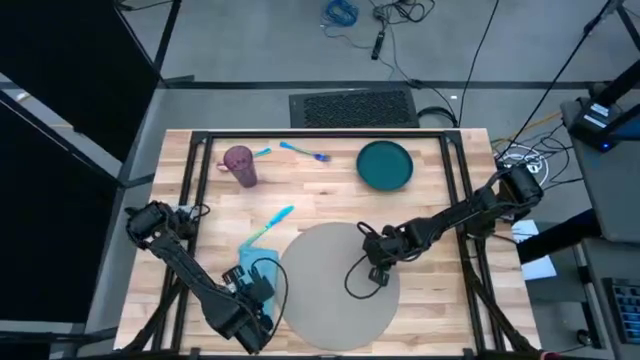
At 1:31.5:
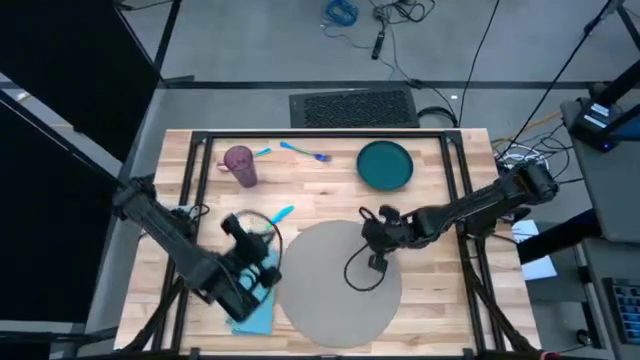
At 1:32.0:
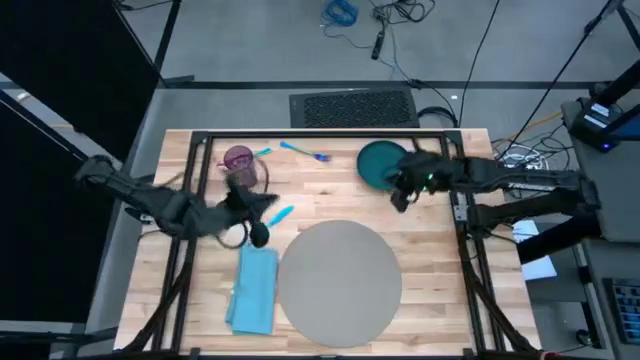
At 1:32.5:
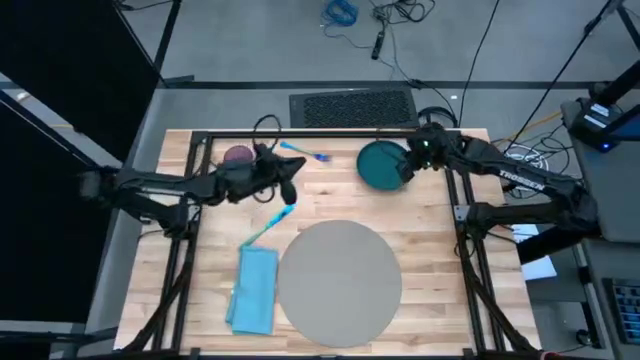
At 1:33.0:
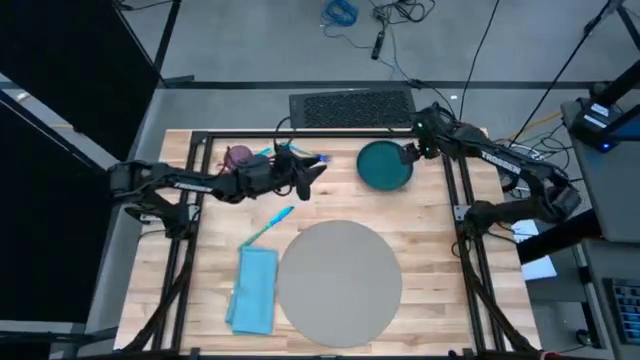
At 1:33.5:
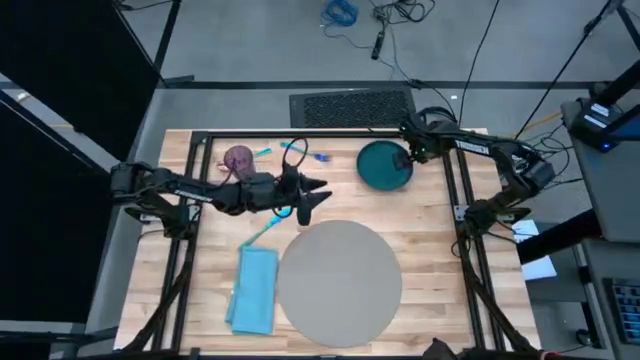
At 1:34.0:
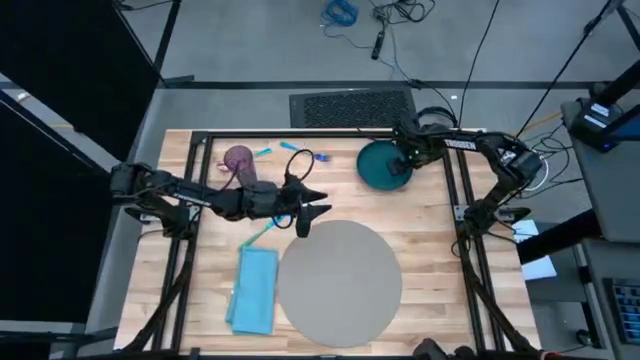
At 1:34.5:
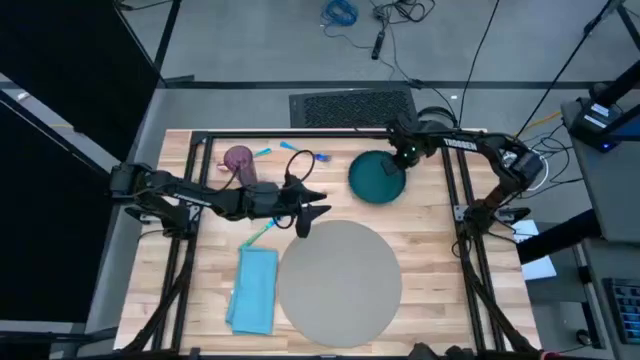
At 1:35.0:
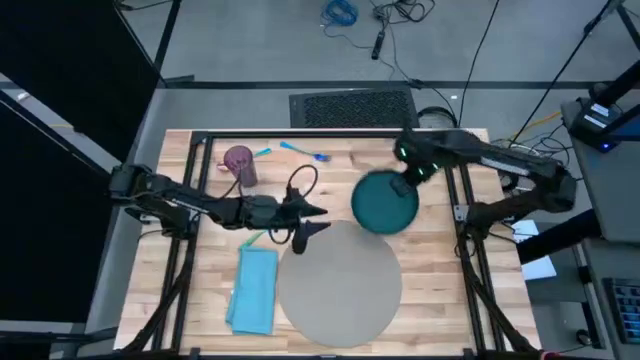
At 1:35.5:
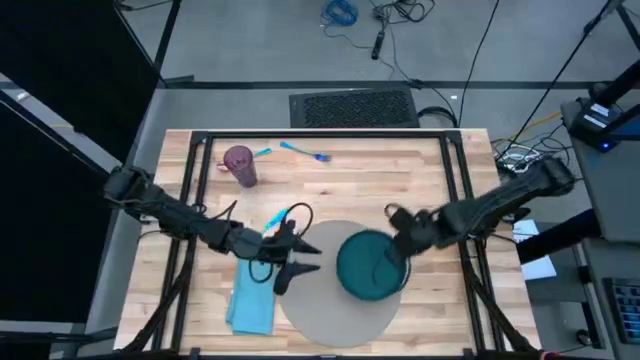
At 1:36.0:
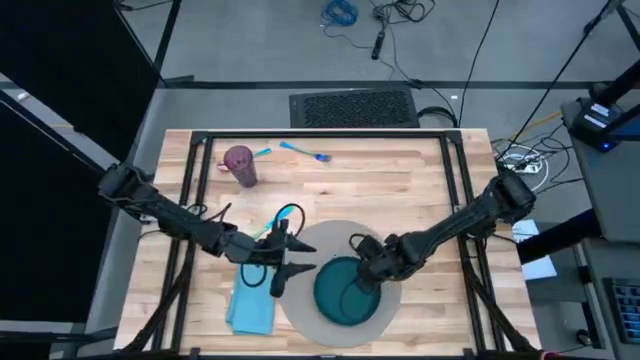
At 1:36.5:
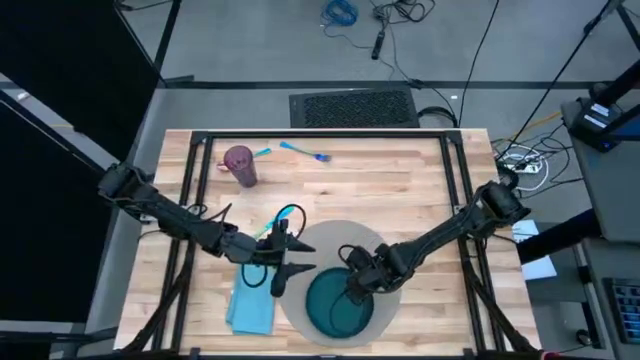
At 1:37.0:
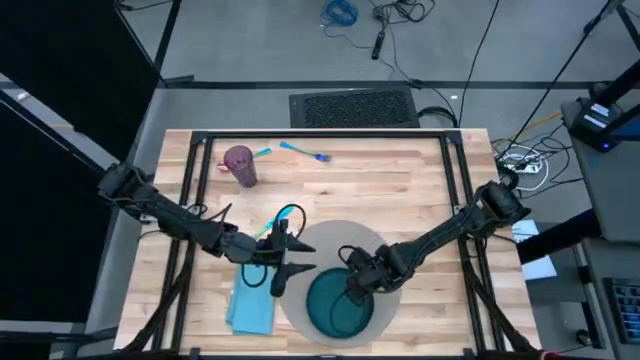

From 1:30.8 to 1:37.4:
Task: Set table place
Put the green plate on the gray mat

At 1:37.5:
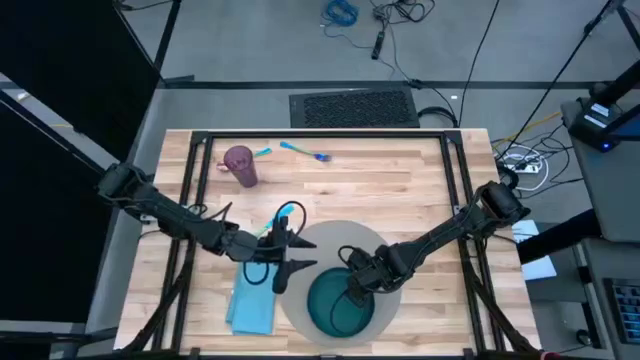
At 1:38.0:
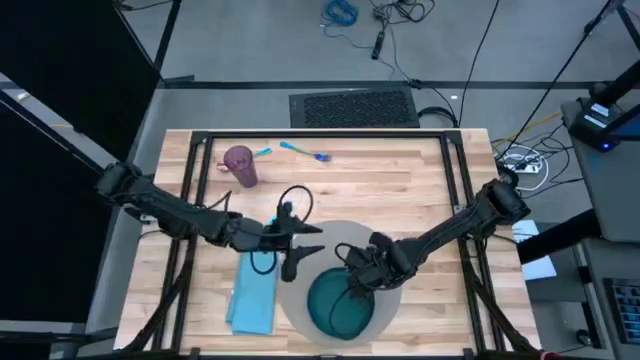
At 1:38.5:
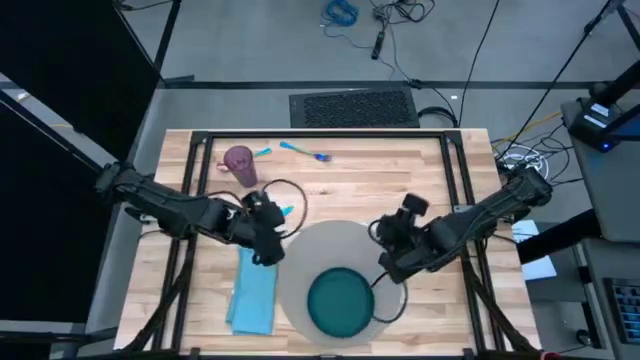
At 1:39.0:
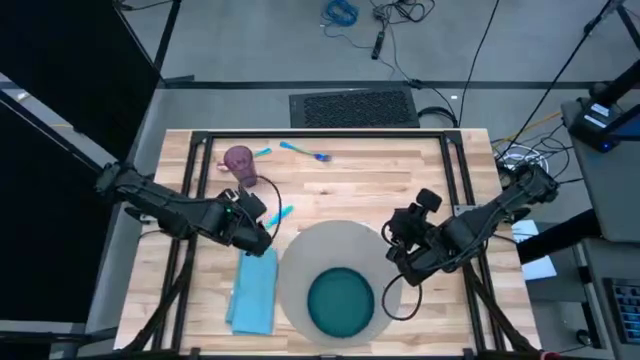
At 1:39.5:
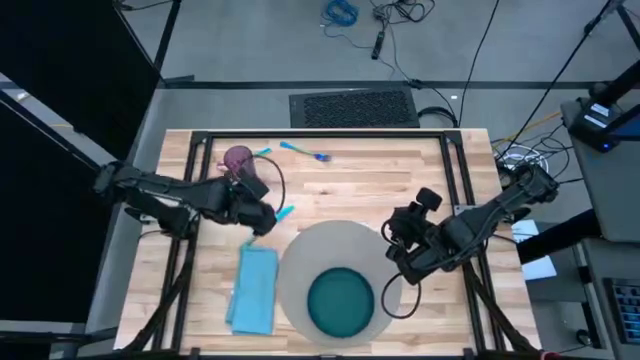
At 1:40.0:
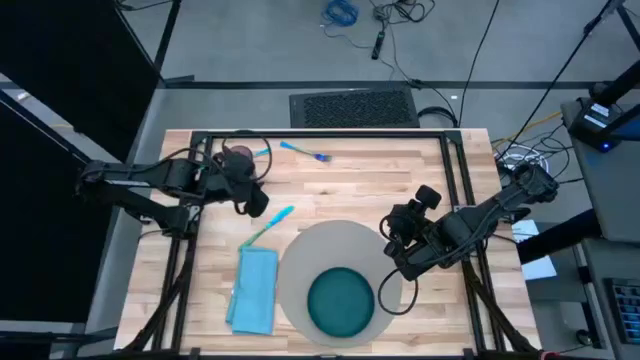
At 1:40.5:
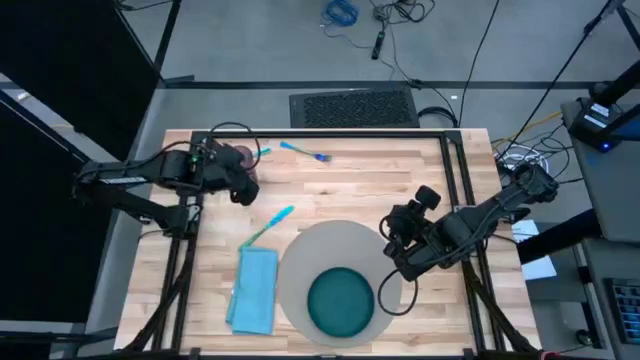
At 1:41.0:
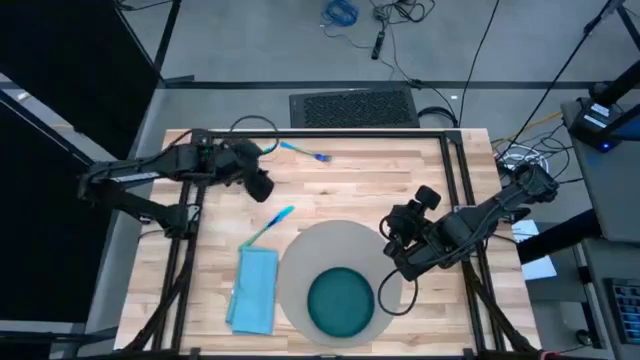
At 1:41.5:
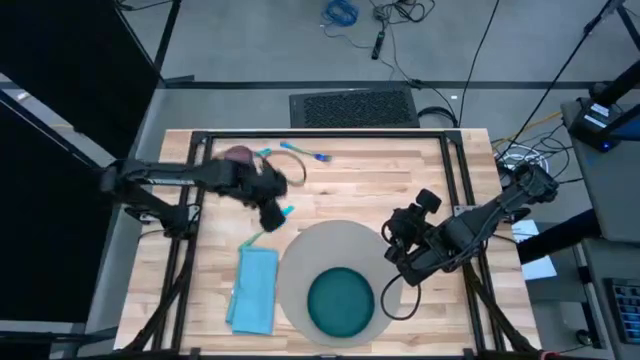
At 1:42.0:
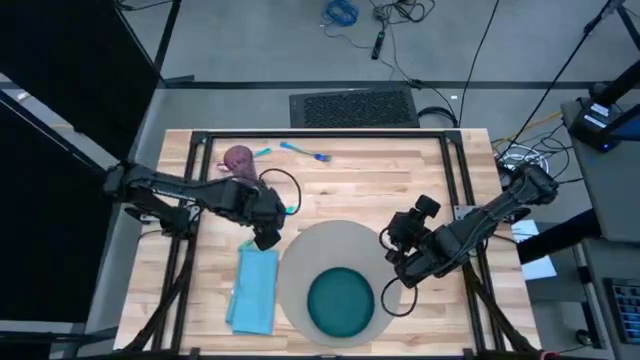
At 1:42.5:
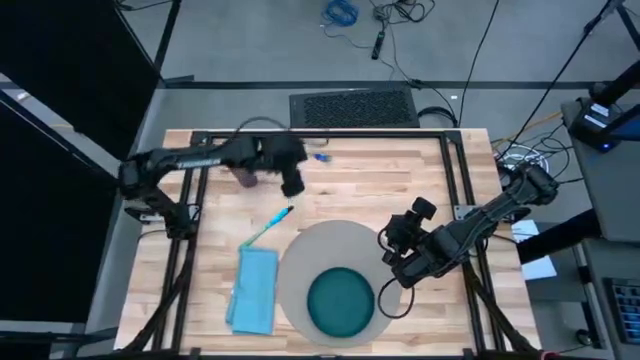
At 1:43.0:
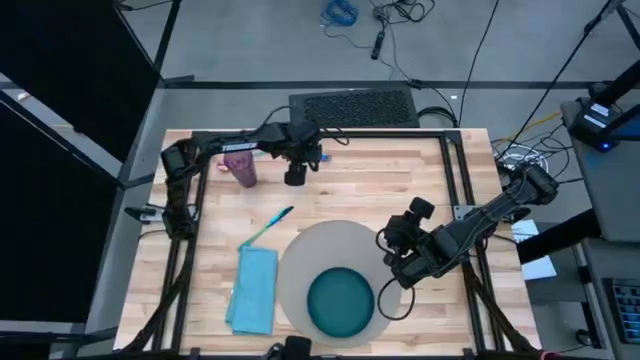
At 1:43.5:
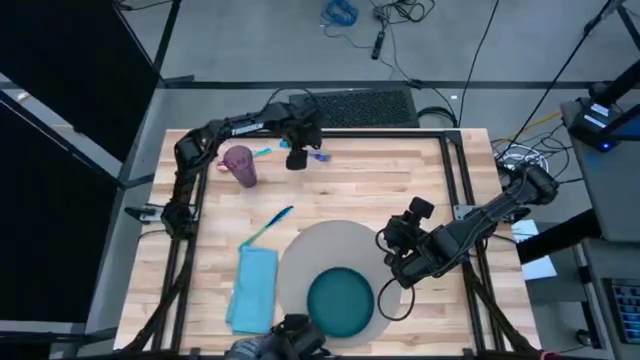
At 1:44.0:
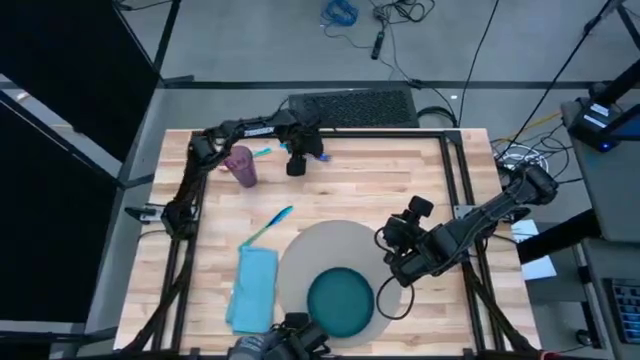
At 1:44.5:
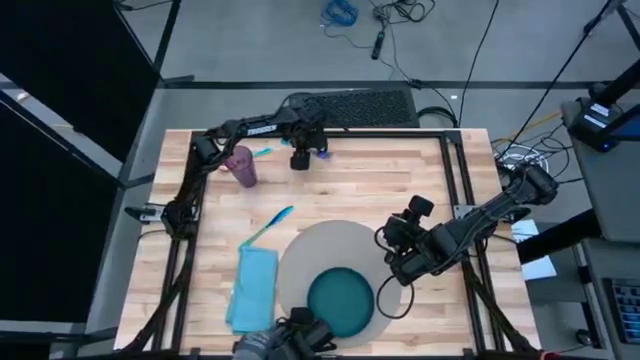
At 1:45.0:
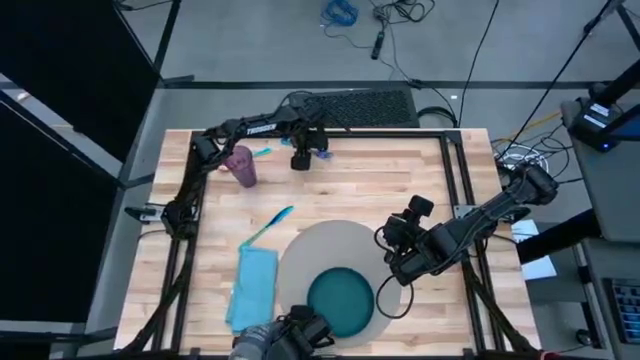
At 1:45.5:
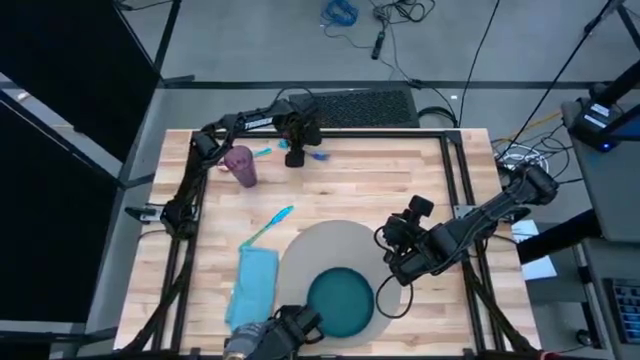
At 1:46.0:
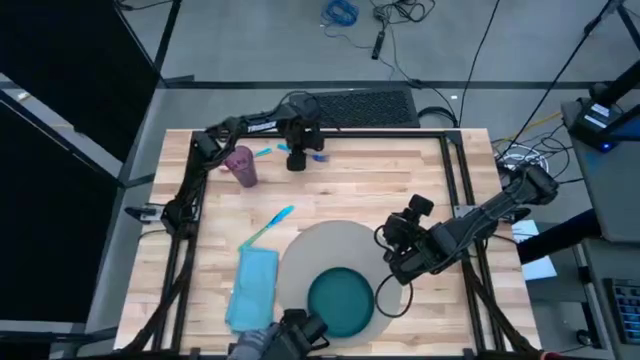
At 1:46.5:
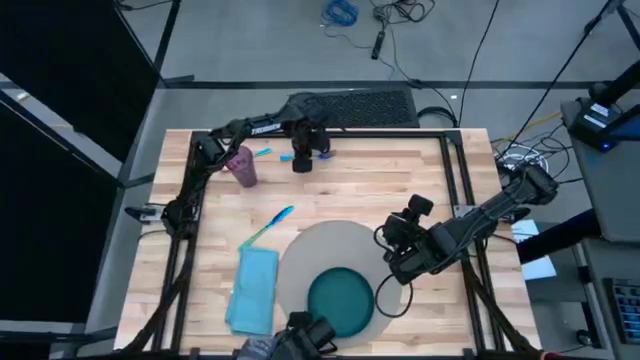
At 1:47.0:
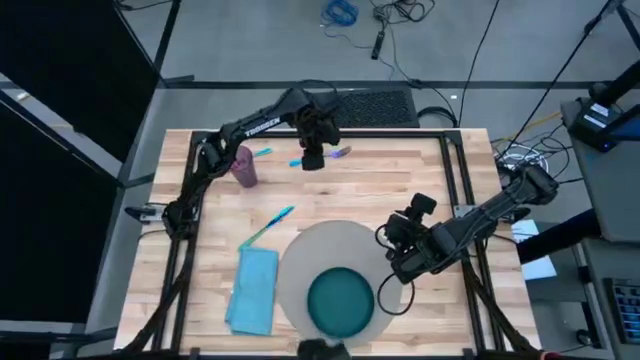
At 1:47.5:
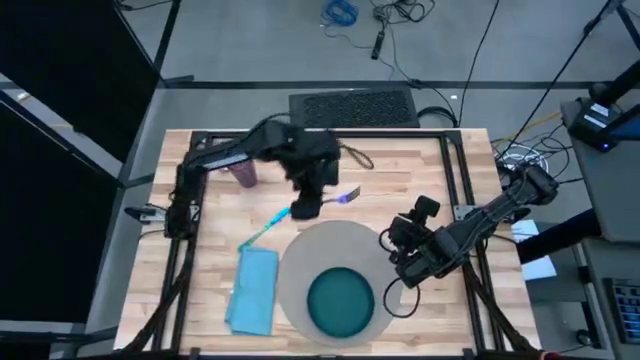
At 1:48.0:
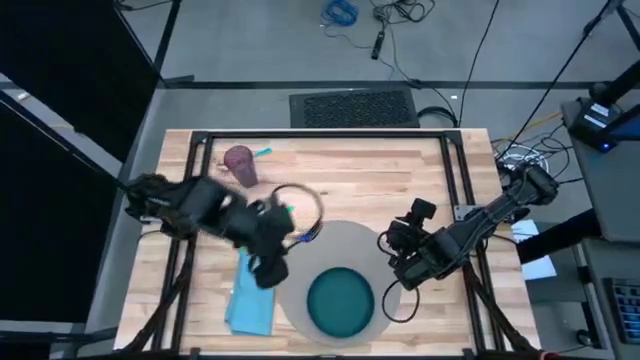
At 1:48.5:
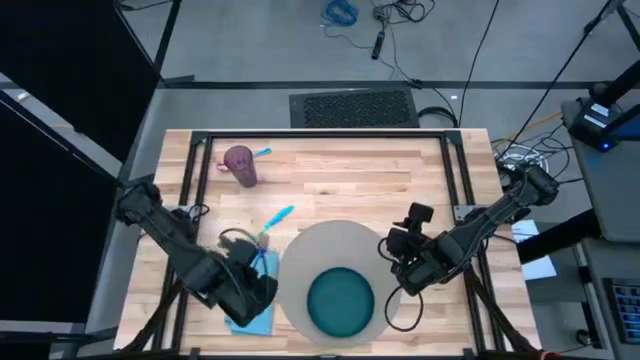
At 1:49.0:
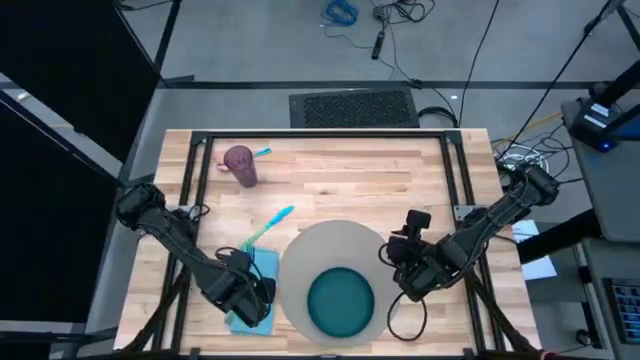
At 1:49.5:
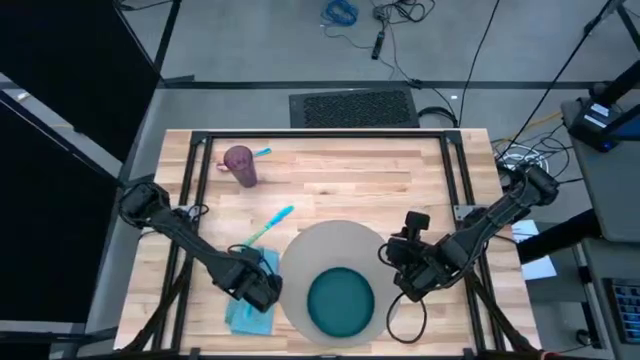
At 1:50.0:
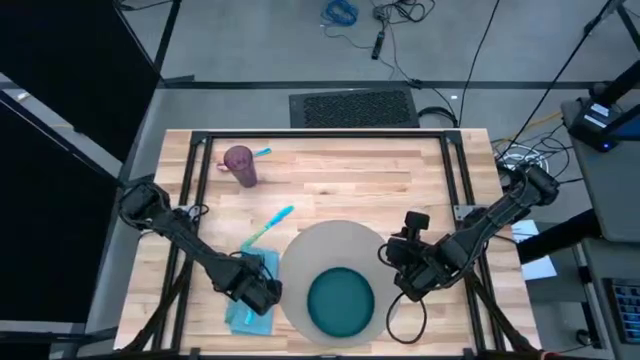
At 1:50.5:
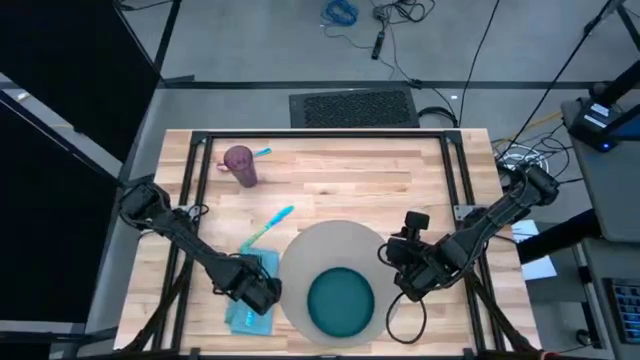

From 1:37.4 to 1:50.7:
Put the blue fork on the top of the blue napkin
